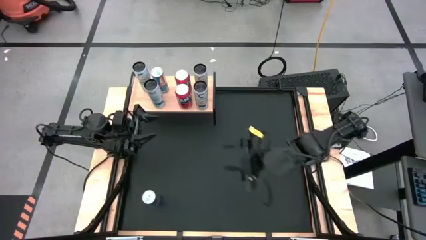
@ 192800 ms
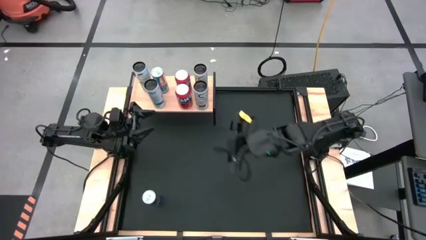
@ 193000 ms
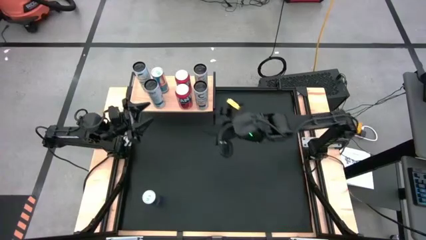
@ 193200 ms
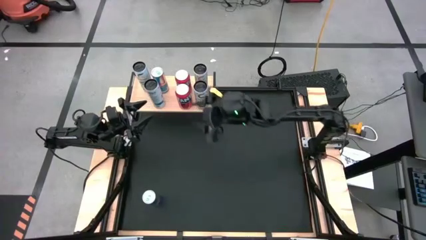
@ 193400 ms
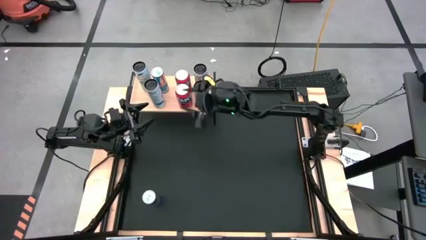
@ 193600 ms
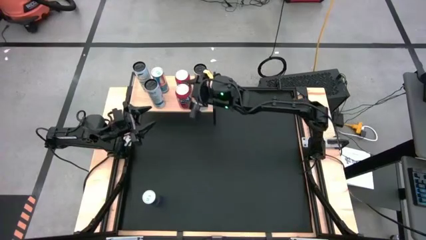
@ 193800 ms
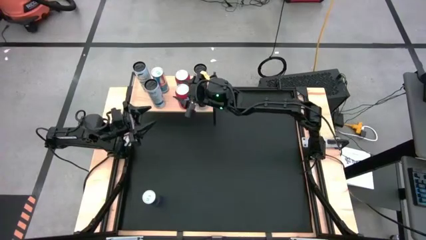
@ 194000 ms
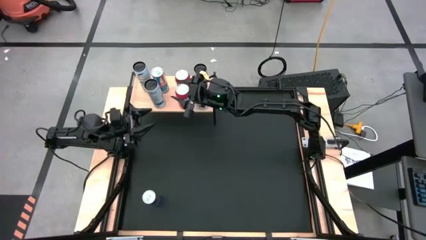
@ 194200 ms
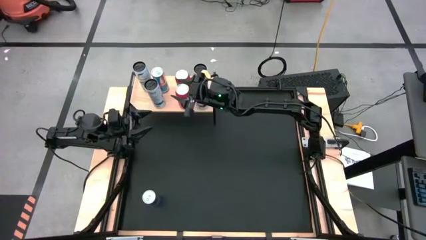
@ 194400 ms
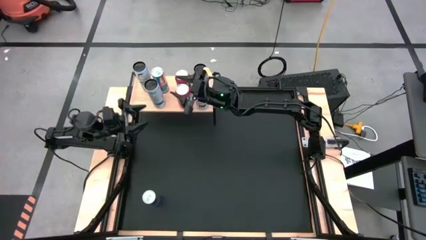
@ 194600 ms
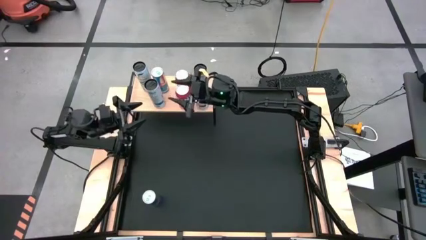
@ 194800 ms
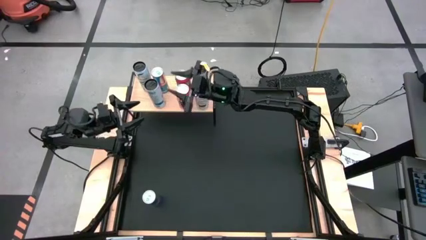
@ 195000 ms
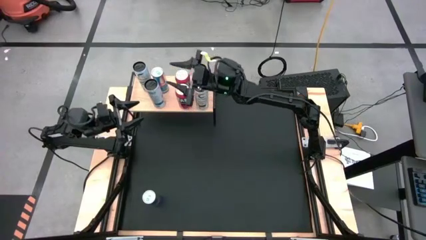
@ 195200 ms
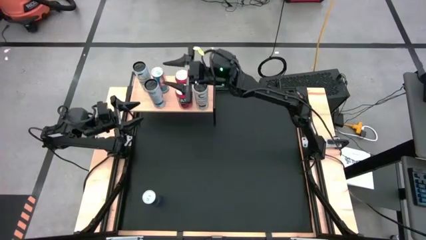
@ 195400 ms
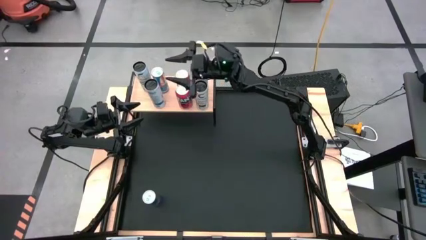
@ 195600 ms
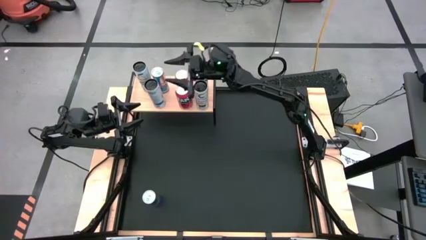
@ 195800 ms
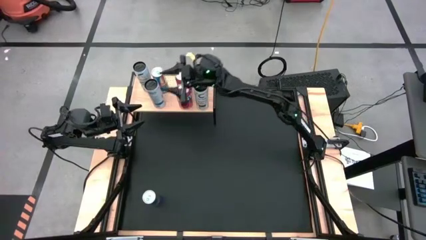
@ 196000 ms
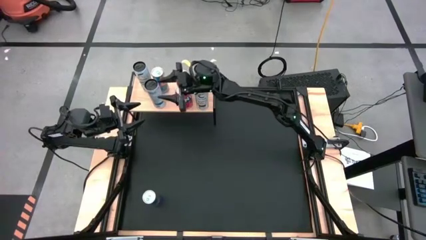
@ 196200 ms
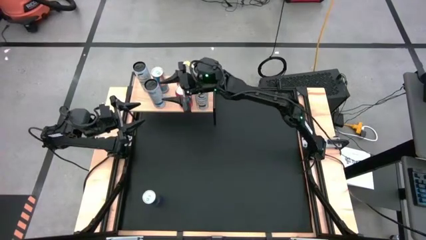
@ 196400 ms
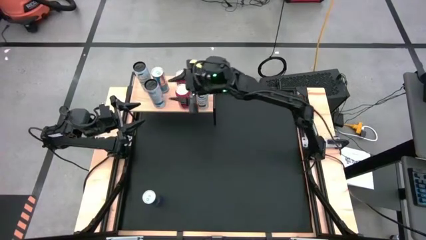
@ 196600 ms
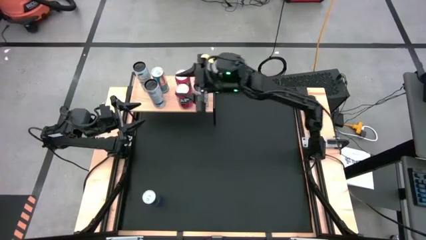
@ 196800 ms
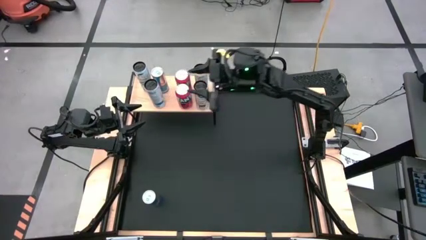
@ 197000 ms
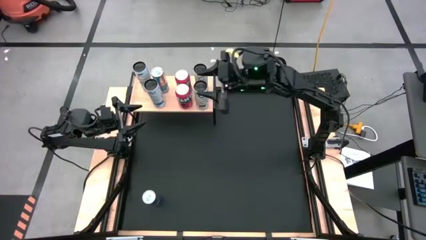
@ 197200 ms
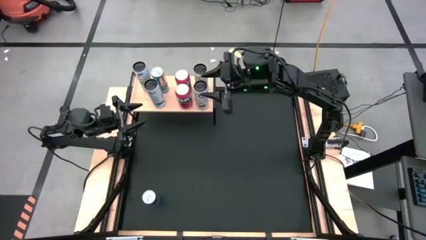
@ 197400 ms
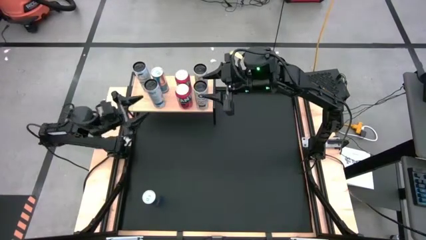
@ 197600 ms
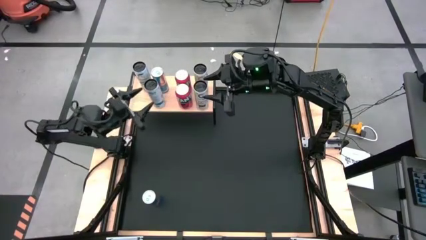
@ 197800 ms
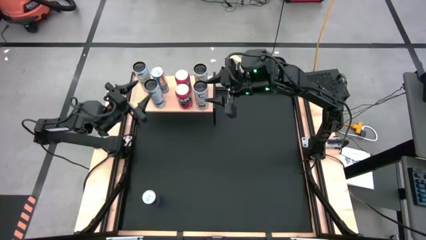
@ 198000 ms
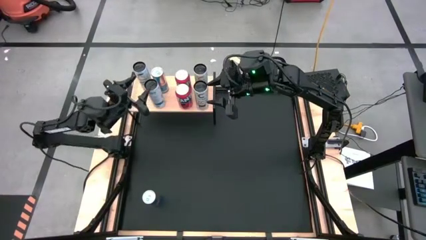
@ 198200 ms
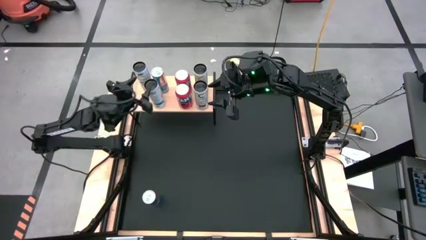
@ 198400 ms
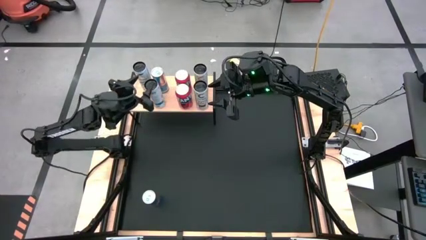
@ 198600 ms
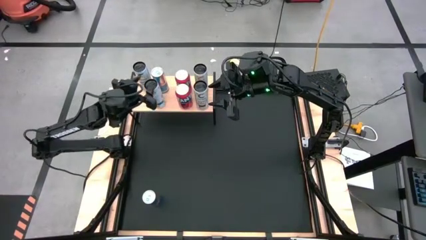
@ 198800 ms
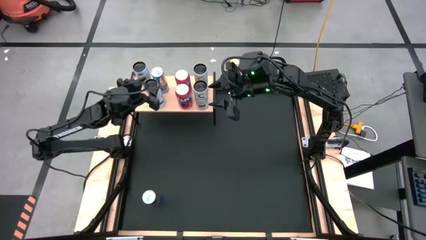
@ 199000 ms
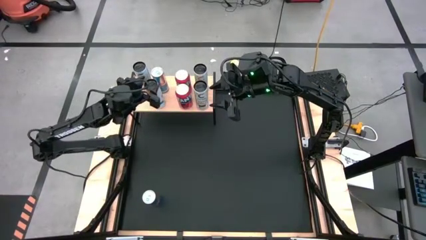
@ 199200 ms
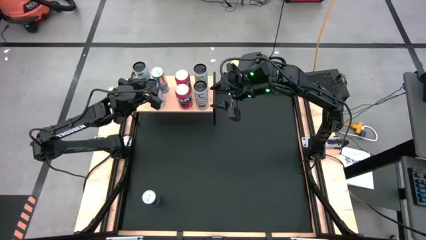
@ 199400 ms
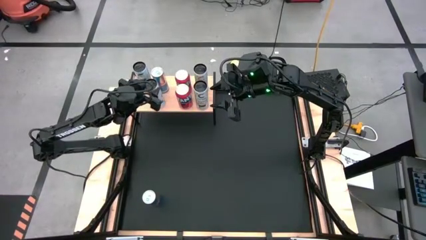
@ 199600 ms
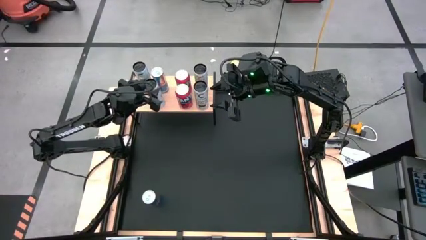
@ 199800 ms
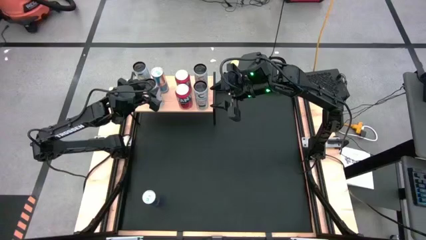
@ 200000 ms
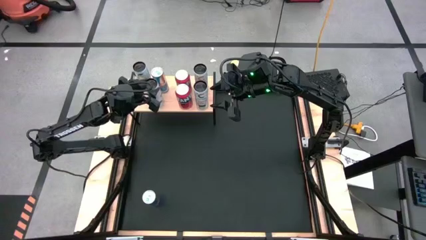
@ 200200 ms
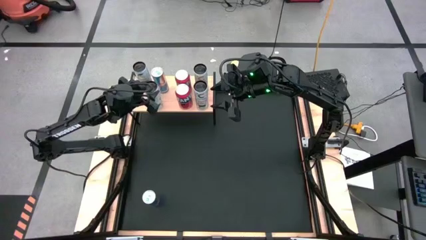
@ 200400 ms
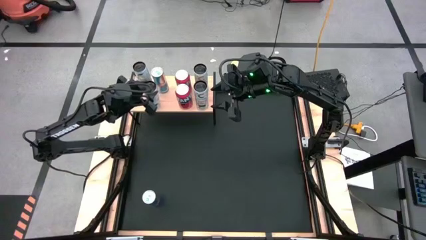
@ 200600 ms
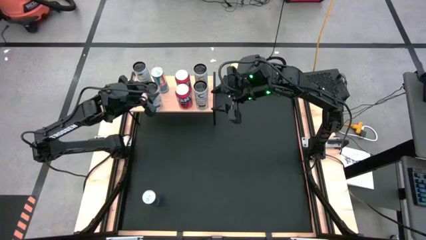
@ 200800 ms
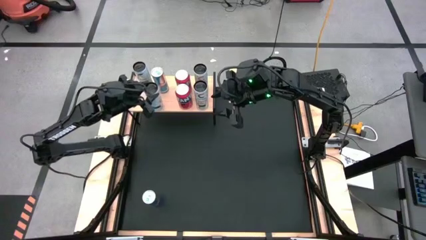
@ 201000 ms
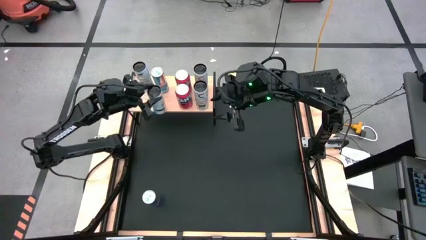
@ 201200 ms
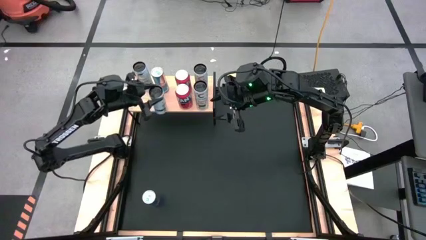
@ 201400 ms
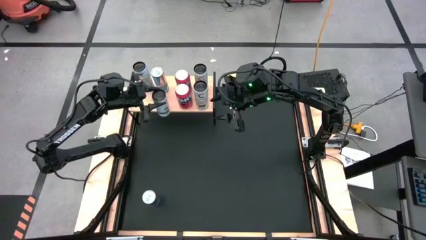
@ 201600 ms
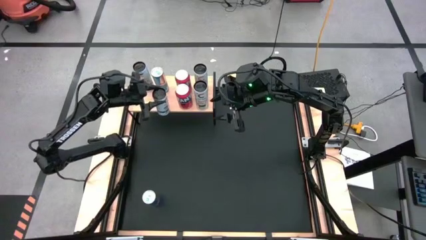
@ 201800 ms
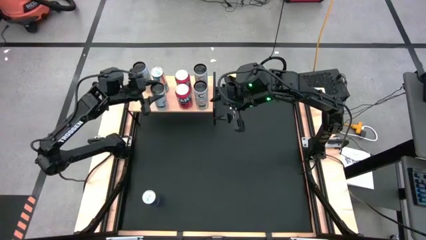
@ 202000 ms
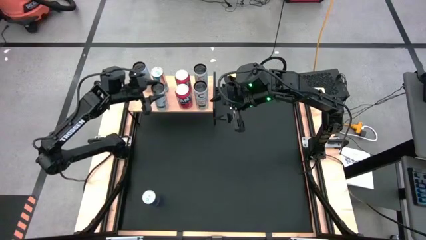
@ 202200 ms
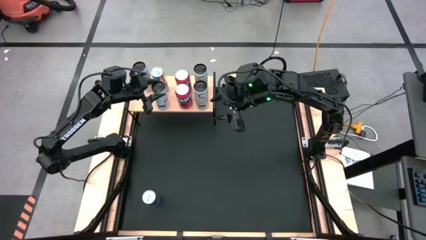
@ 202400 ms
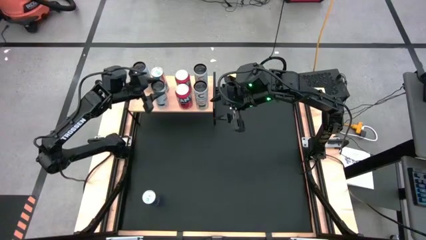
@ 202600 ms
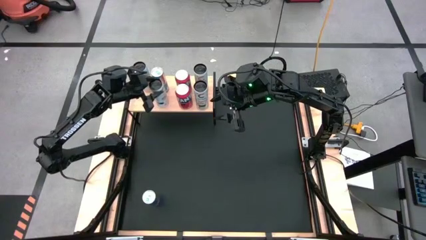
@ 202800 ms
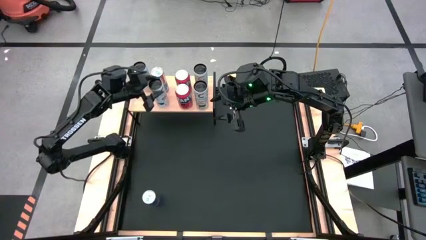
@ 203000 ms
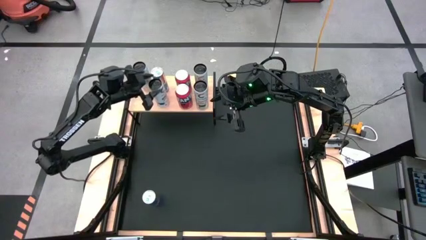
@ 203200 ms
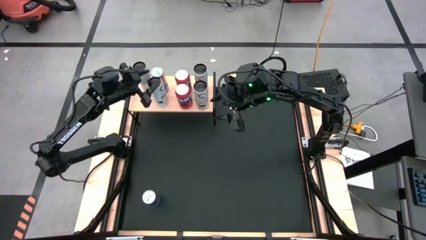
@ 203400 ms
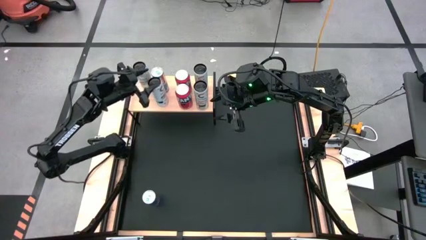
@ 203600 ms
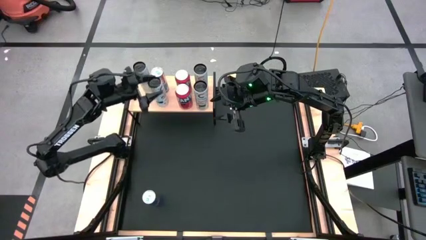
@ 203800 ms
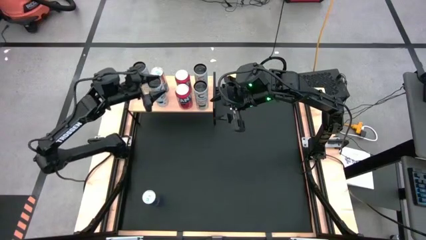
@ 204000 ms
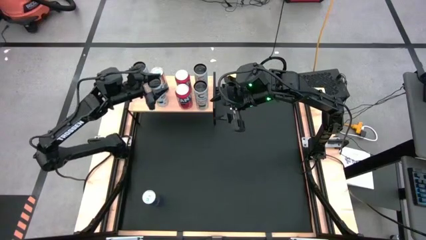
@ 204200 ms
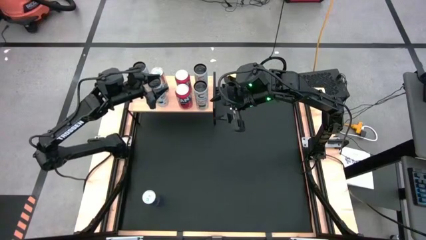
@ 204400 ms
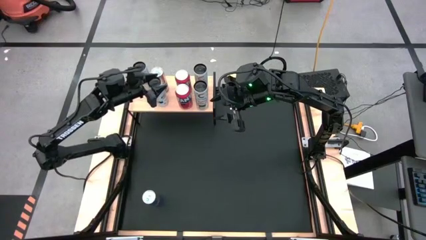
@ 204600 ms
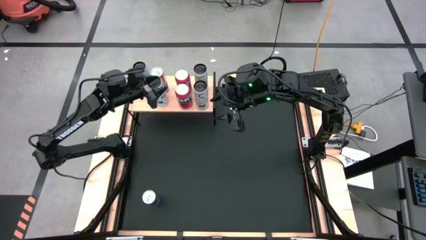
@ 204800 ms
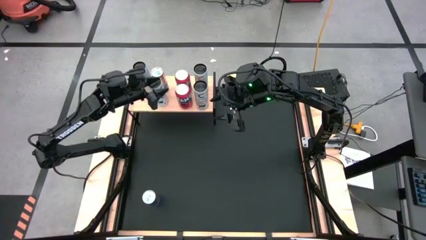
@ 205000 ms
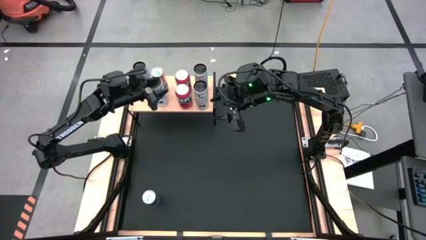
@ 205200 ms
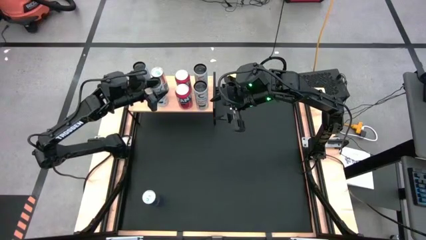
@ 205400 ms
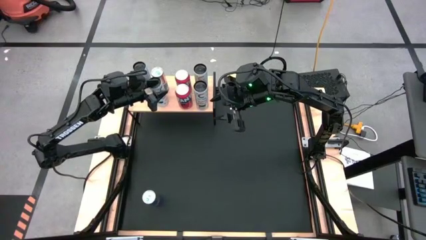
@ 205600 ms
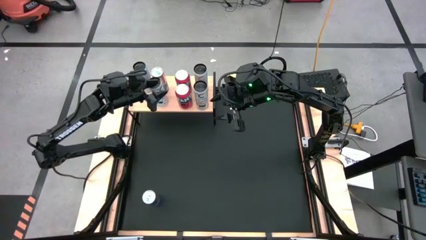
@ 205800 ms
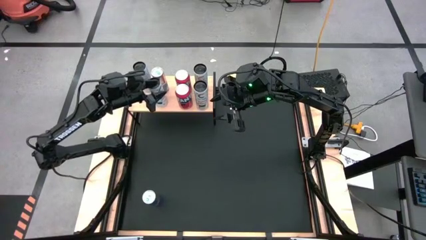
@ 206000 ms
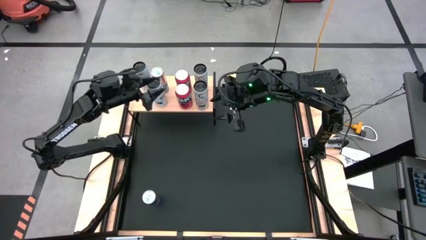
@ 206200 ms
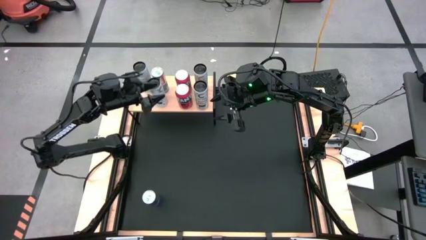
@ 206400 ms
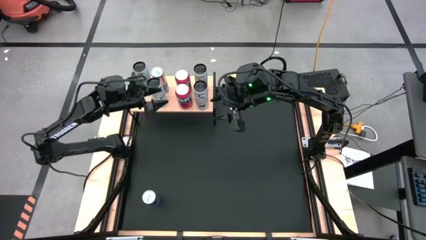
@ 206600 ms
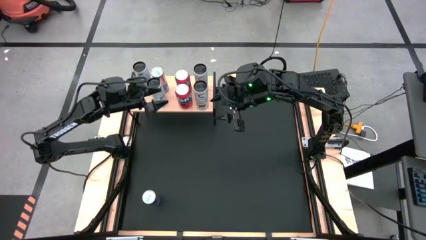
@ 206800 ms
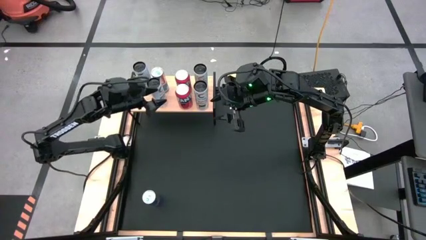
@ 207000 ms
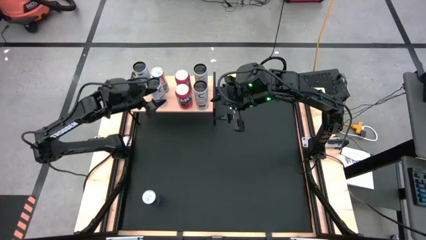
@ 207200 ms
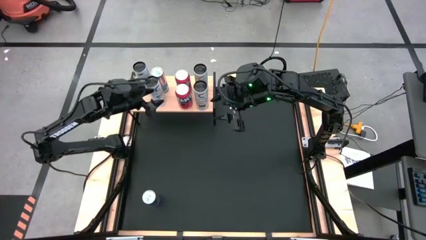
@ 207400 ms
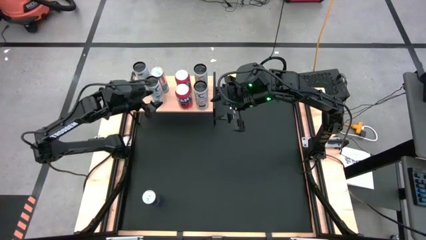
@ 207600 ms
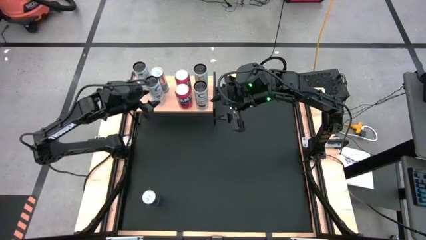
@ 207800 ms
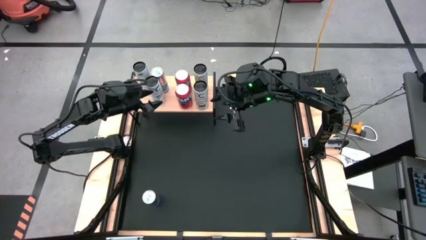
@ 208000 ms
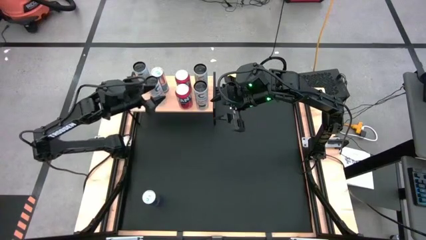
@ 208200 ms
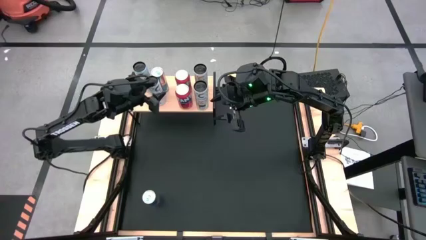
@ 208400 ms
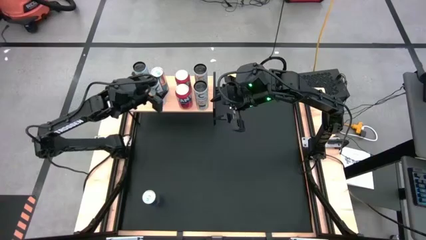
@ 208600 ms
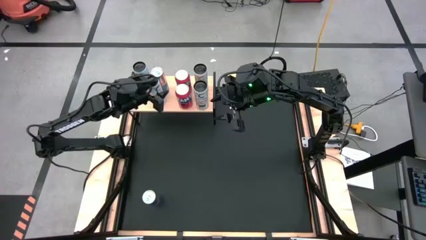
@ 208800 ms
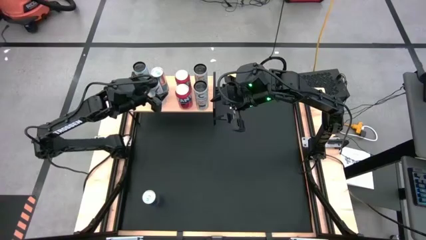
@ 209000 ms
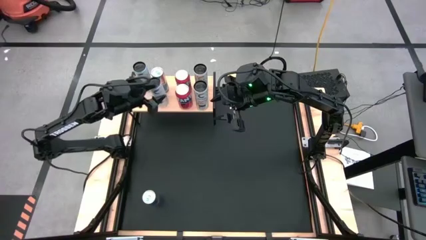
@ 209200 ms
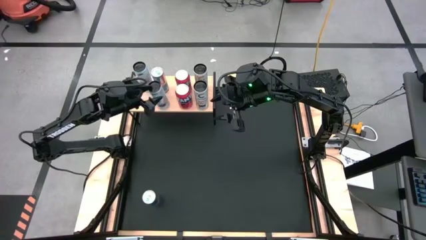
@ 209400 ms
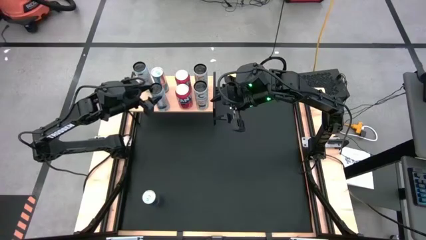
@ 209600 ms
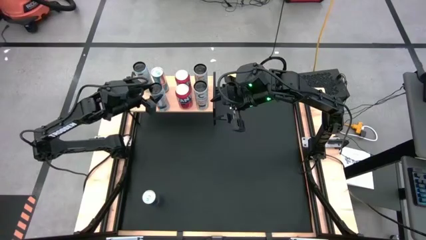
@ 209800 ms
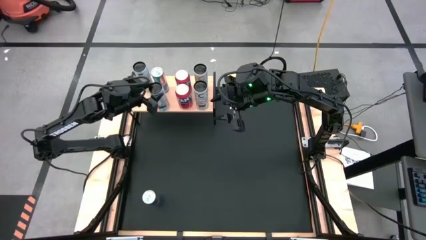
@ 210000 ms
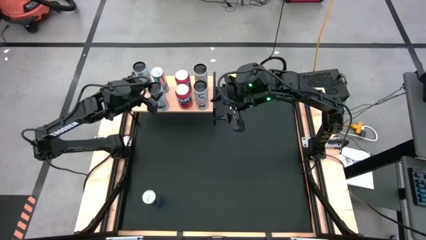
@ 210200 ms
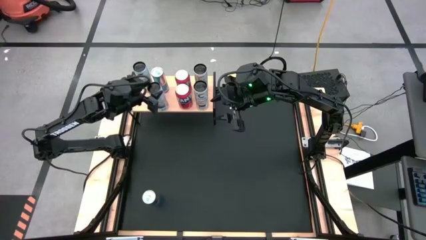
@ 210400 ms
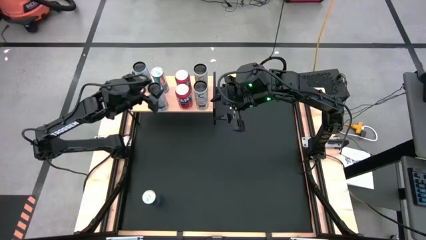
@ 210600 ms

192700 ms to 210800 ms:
Task: Place canned beverage on shelf
Put the white-blue soda can aligned with the other white-blue soda can on the shelf
